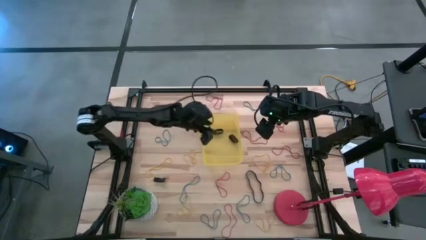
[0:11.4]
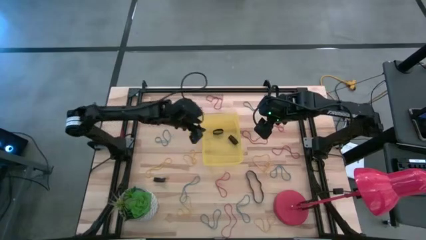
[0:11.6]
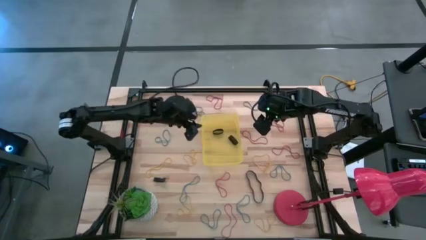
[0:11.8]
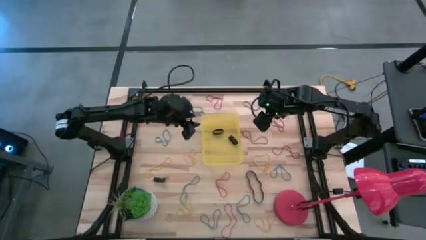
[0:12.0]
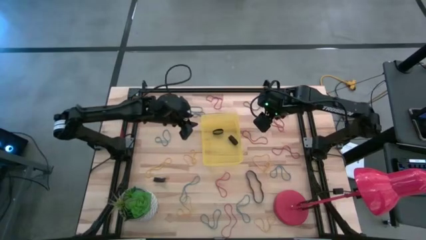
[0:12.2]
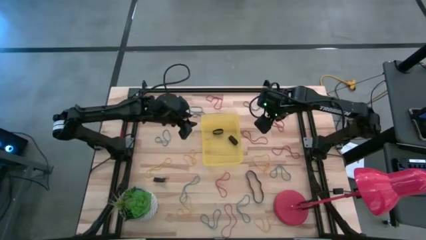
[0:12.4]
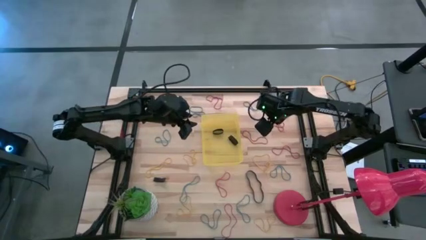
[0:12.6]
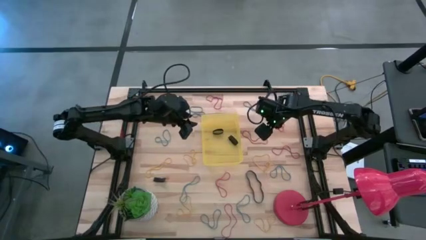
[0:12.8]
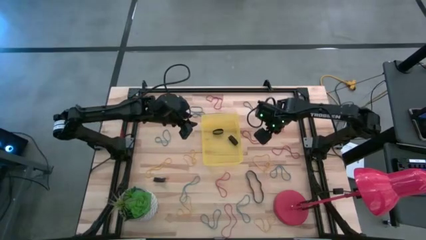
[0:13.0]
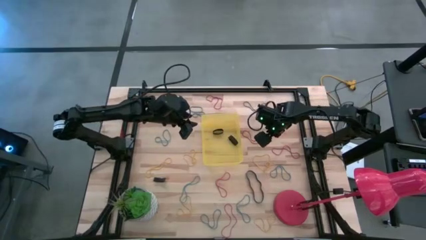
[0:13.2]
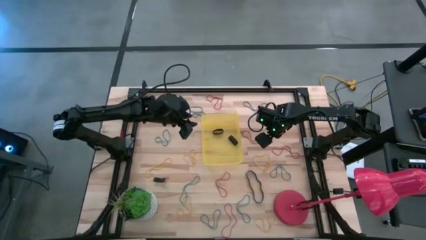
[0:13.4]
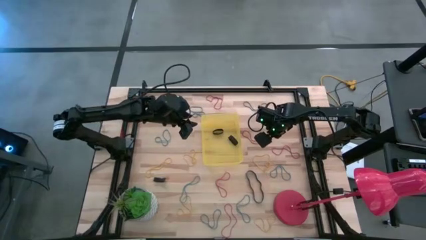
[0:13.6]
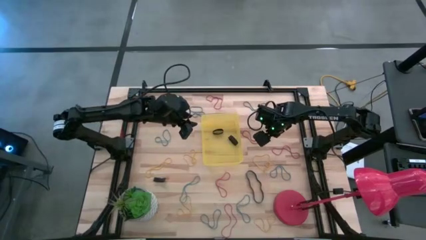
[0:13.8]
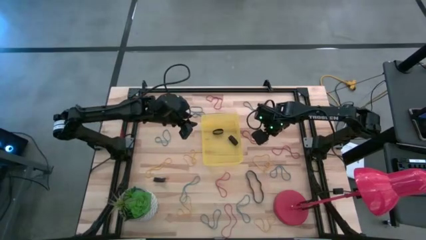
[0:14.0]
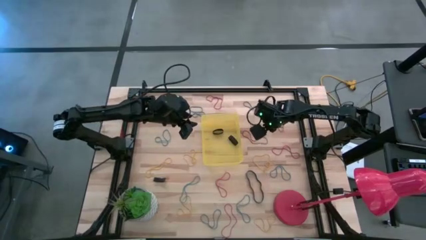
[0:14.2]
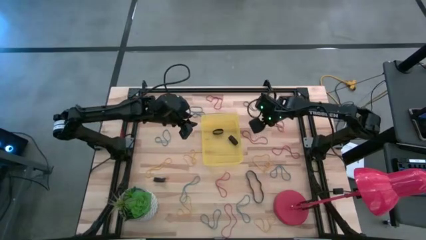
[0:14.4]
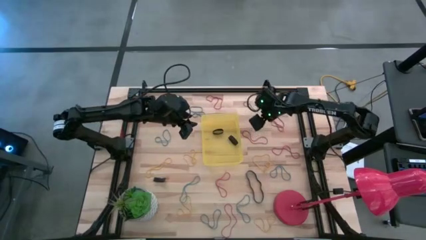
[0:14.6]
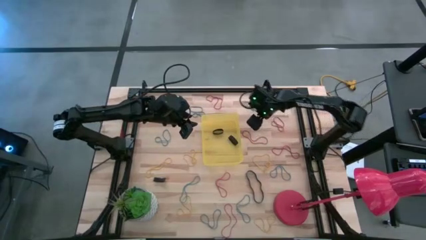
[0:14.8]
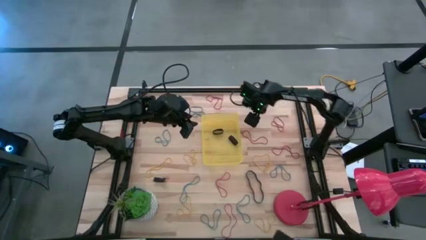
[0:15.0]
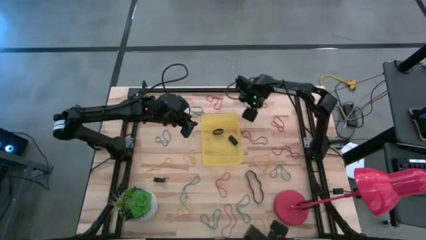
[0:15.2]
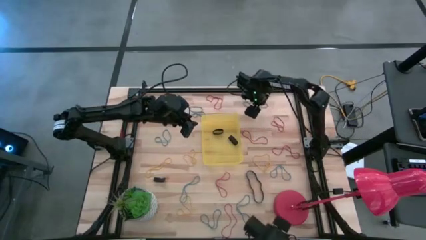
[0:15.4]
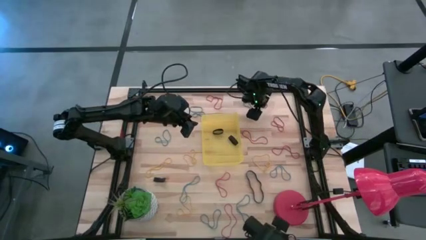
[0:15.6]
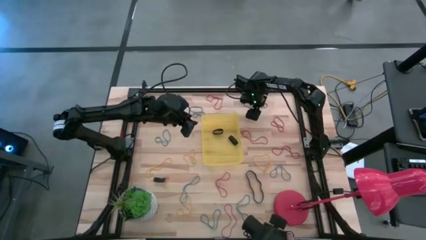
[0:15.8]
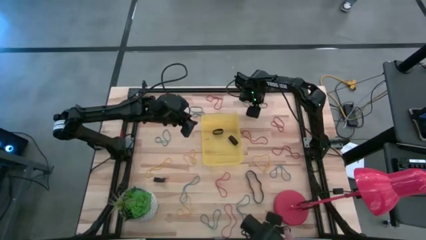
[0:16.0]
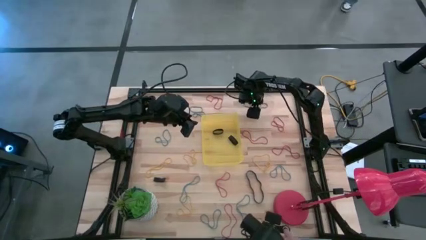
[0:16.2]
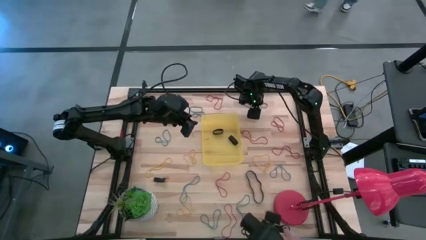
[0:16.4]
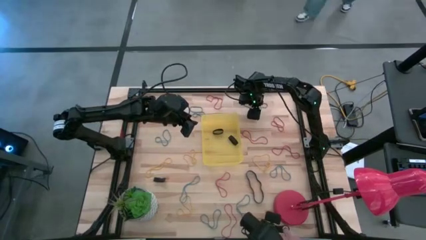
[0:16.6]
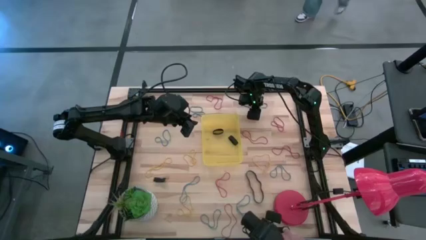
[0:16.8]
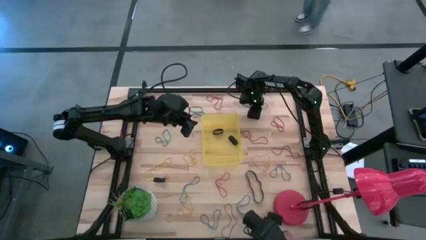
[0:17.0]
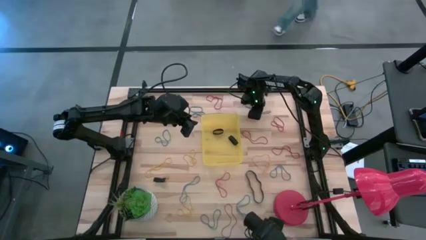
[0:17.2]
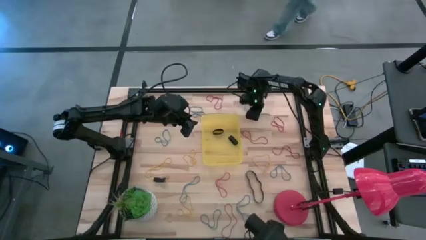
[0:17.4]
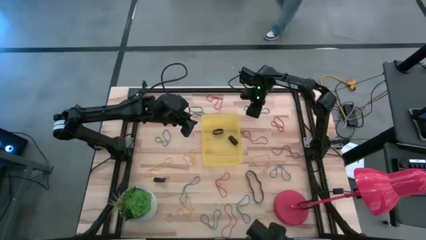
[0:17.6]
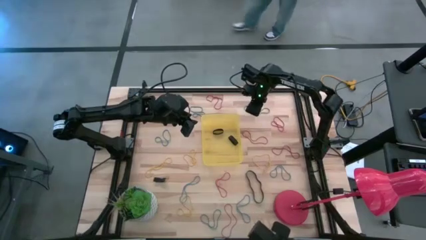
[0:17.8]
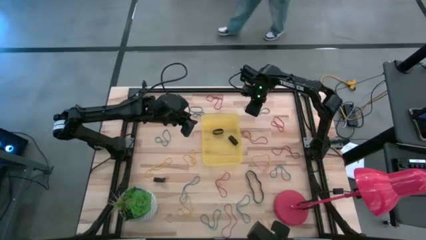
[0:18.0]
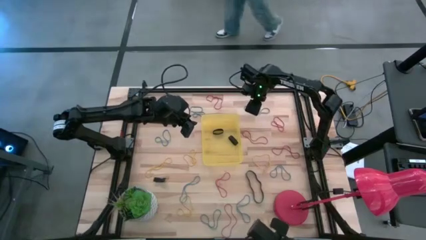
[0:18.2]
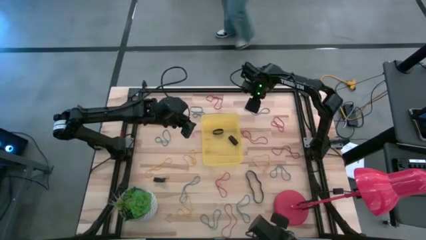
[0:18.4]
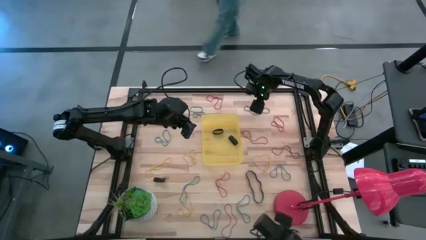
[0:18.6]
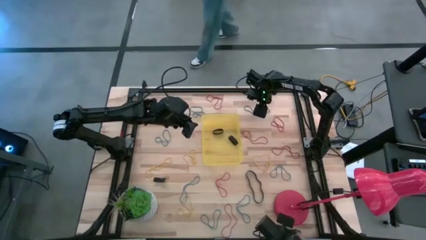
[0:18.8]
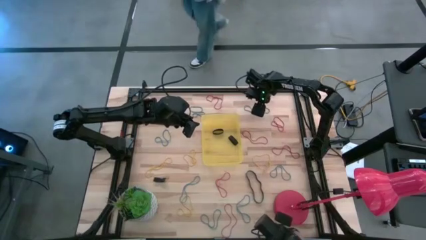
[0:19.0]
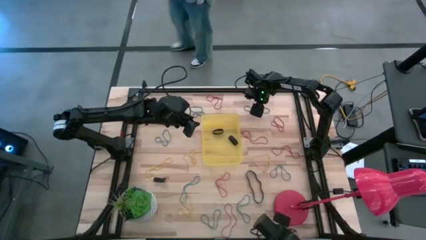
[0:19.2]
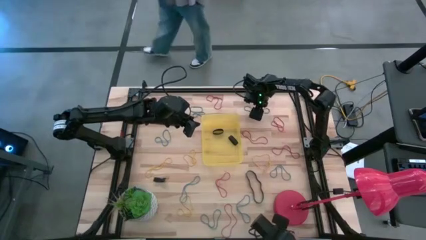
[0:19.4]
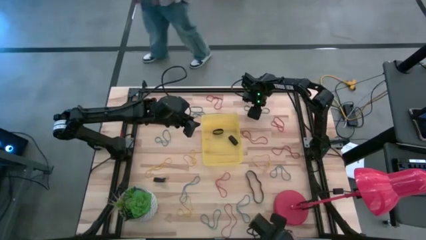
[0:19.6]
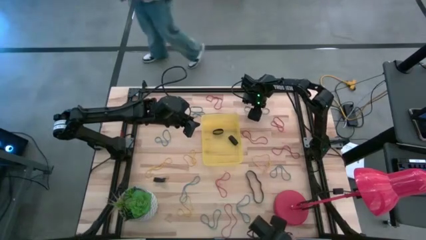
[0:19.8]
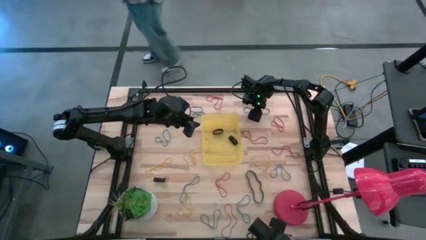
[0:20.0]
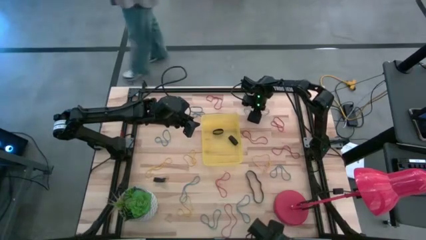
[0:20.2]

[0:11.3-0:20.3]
Task: Pick and place rubber bands into bin
Put the blue rubber band into the yellow bin

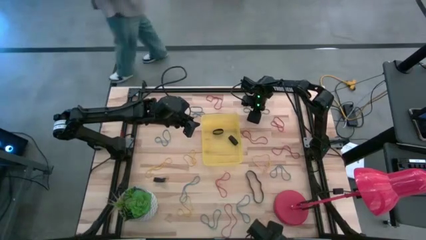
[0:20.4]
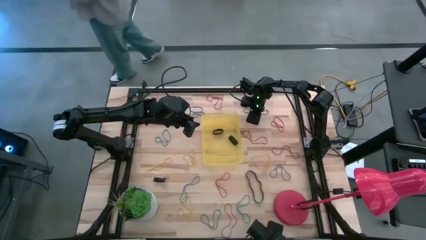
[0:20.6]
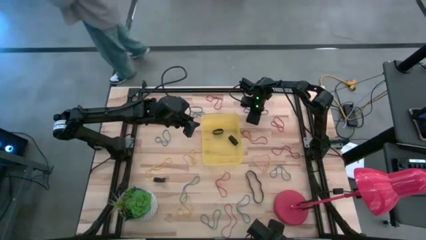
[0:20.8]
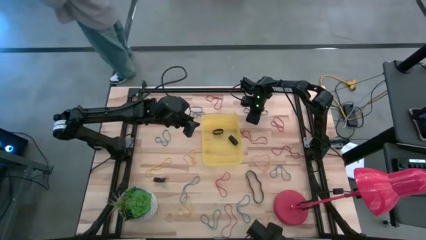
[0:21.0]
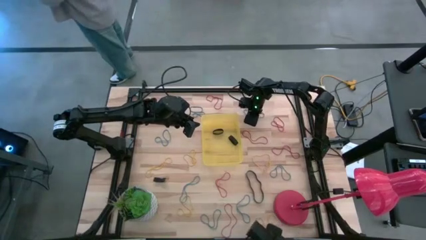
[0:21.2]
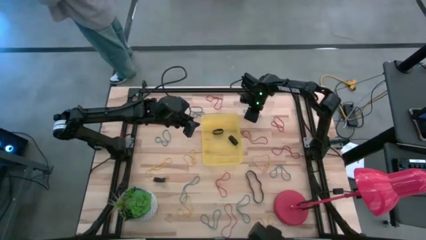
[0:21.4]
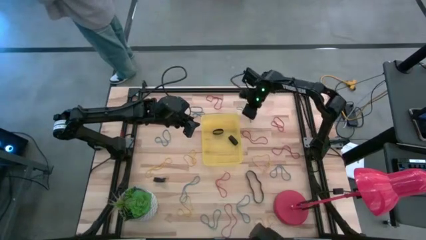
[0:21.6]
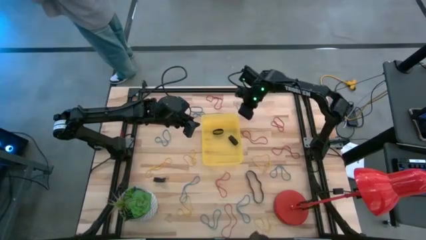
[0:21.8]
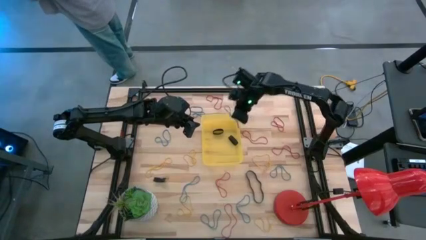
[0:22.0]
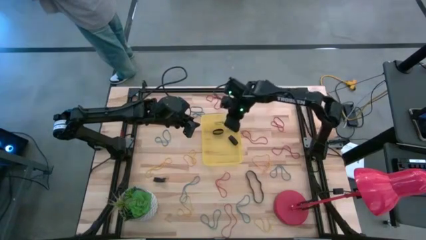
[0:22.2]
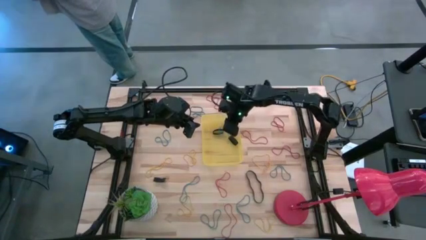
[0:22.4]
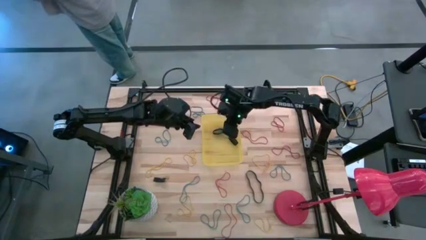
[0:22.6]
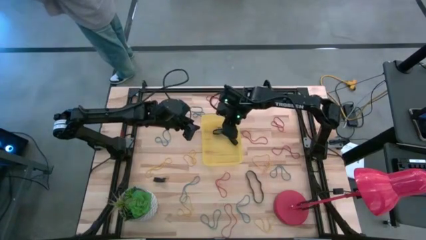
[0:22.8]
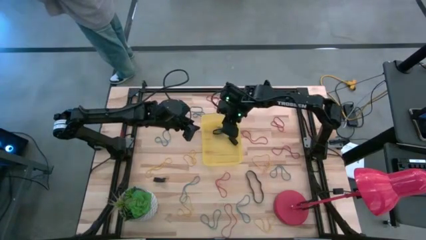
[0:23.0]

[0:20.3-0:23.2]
Put the blue rubber band into the yellow bin

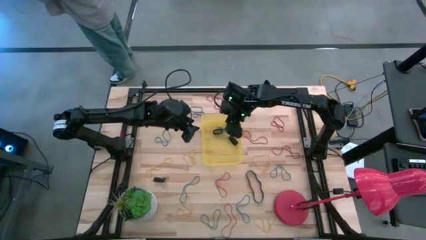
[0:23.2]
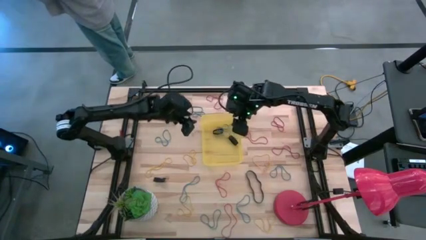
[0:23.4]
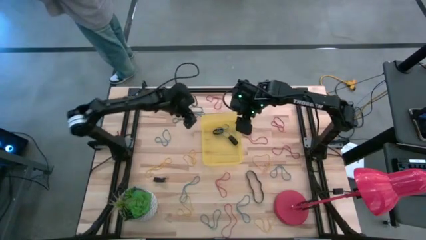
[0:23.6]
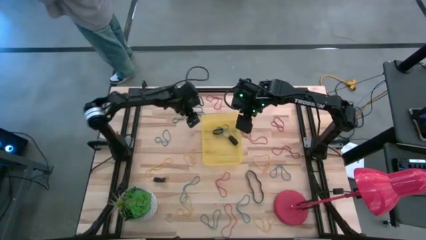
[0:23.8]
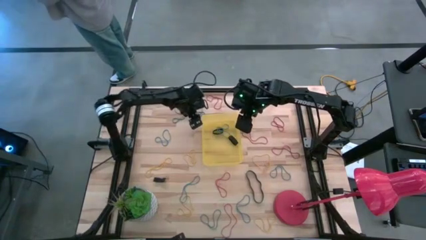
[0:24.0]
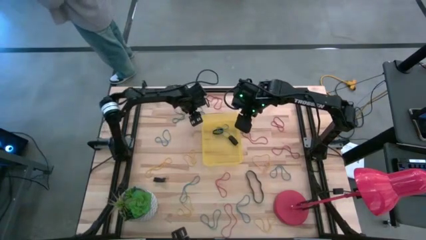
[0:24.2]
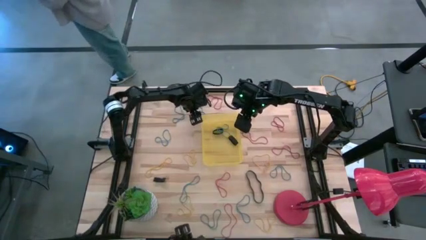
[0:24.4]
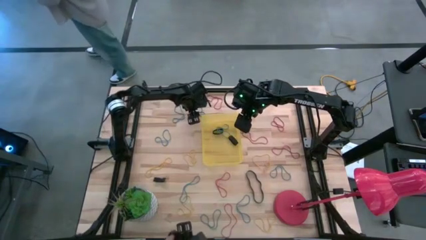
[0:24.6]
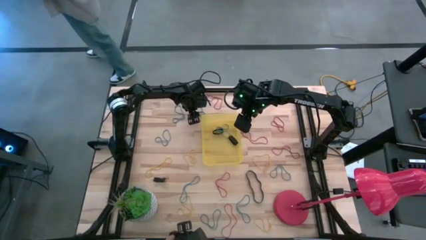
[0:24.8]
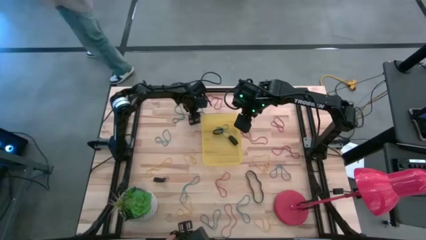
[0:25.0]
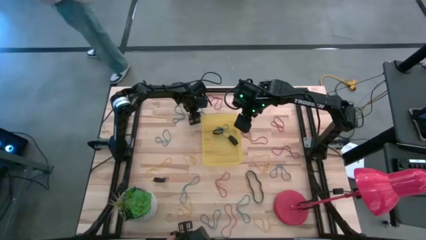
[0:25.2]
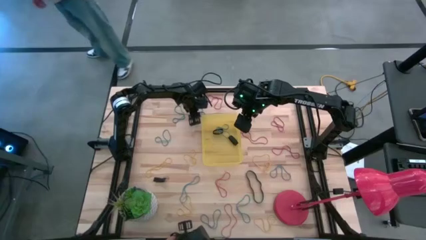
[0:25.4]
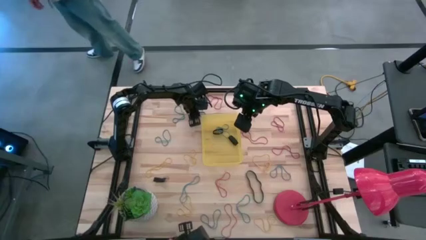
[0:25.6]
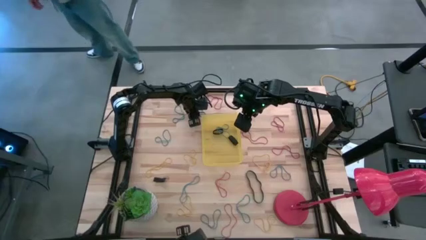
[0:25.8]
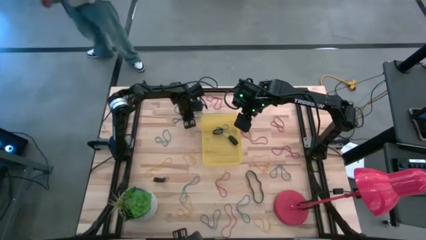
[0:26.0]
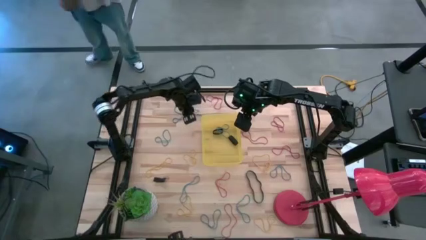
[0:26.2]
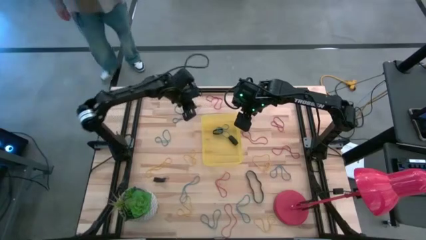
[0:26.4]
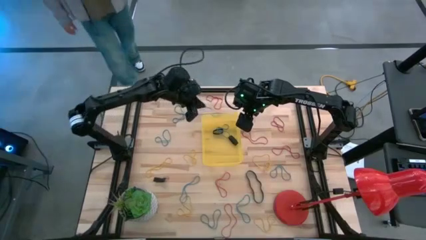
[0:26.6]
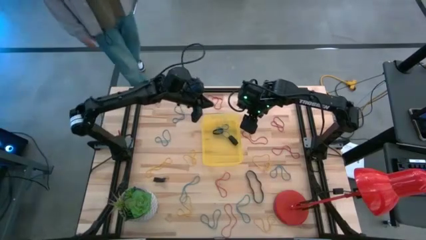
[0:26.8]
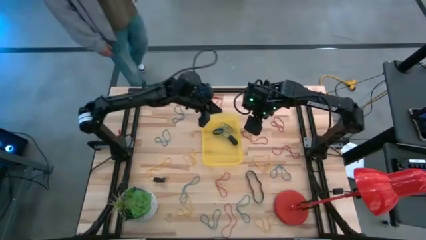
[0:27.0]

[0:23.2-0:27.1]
Put the blue rubber band into the yellow bin
